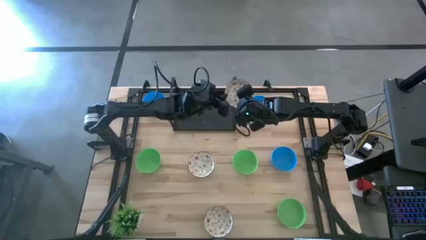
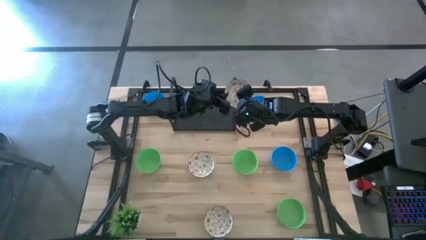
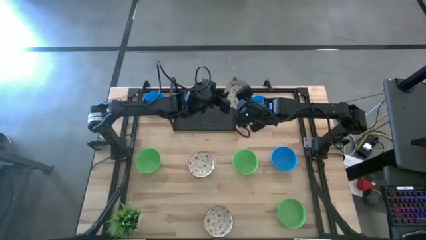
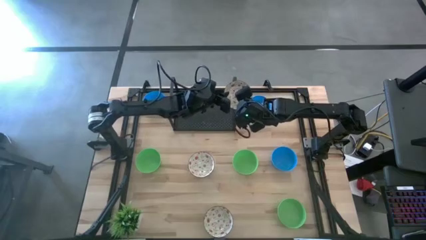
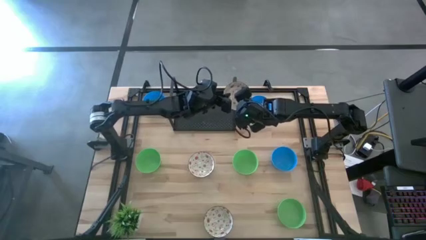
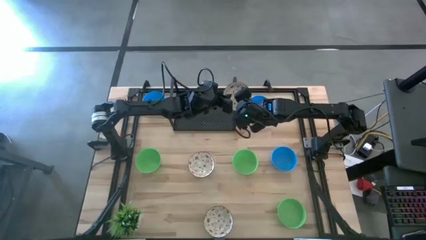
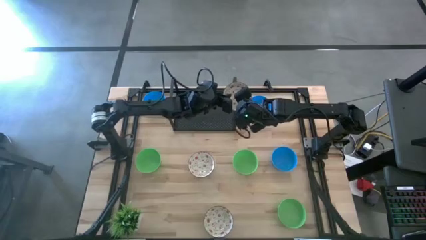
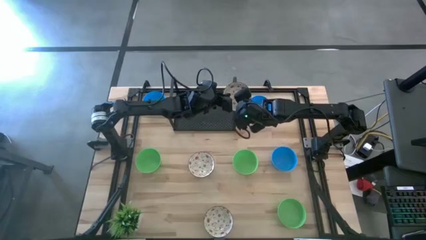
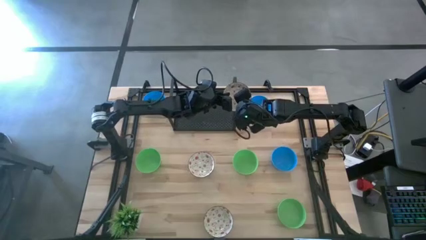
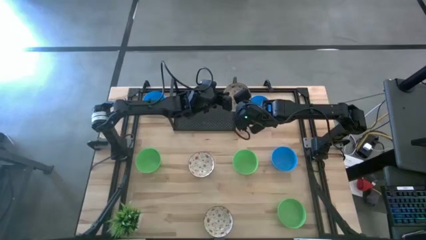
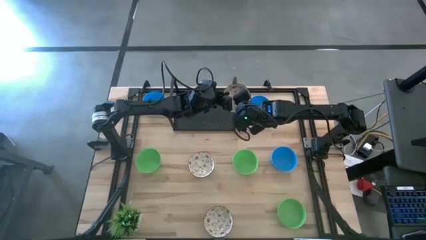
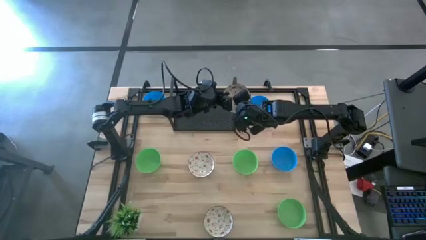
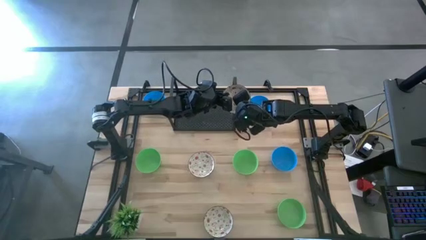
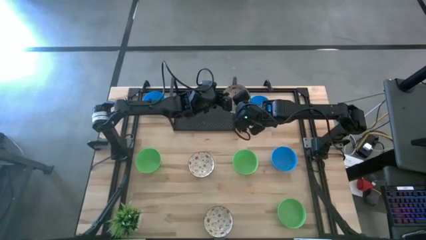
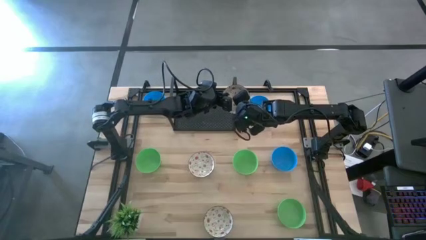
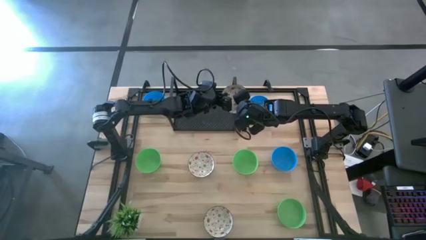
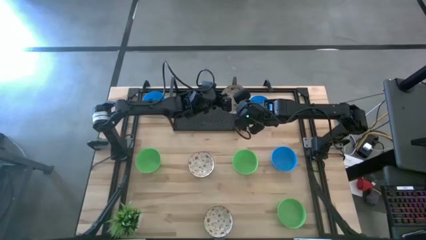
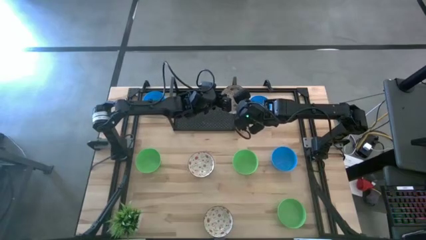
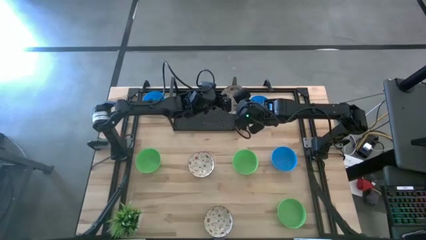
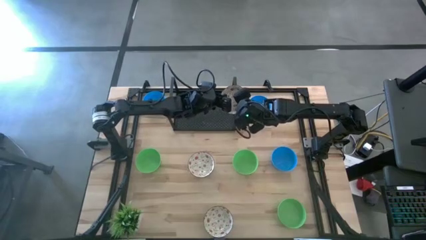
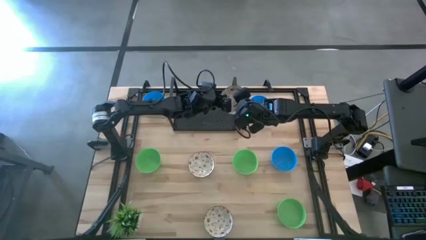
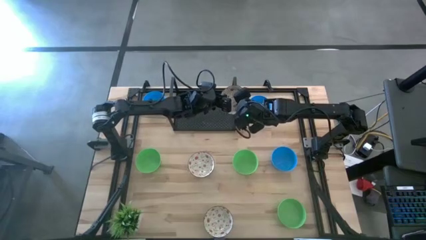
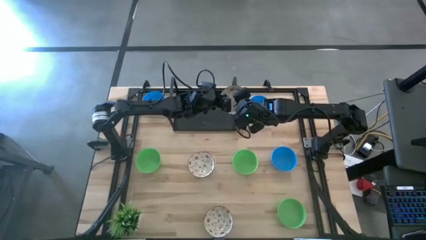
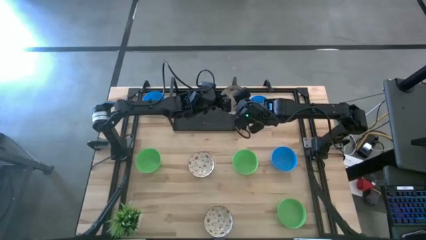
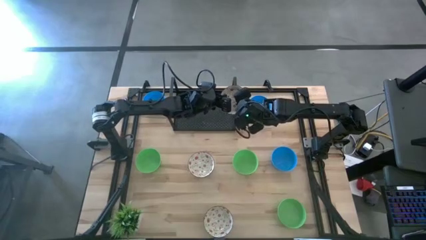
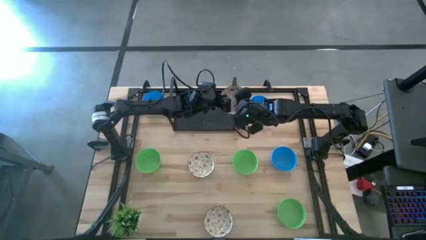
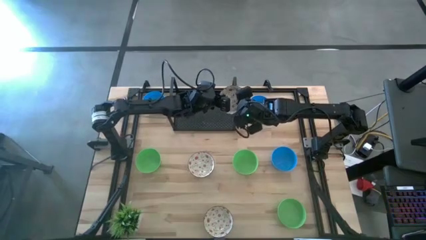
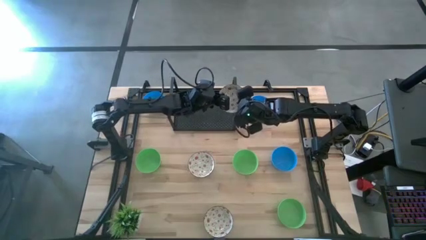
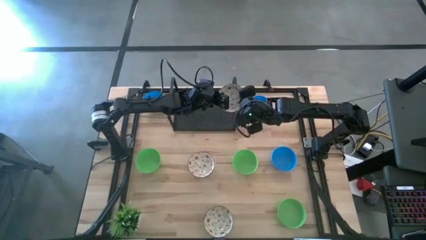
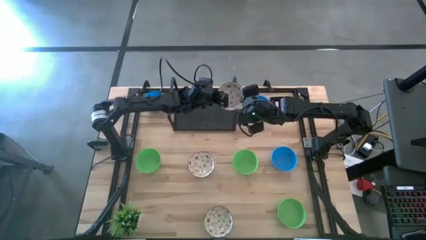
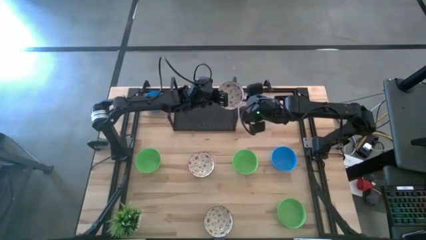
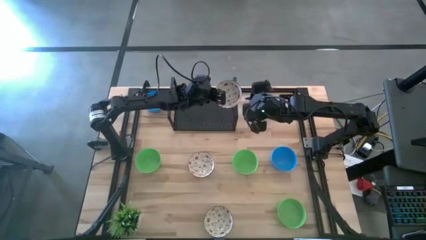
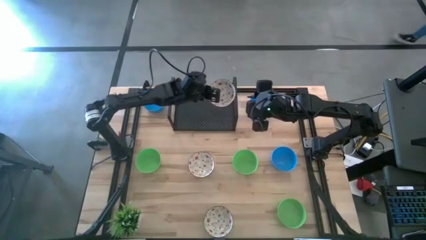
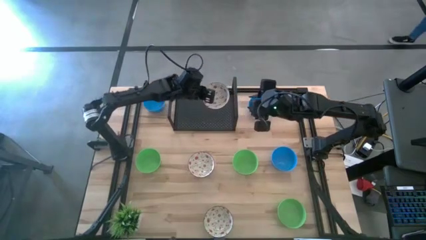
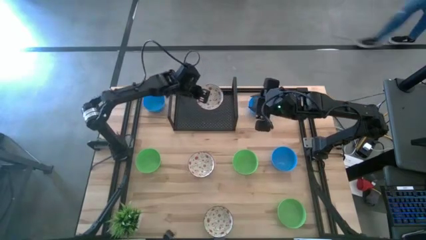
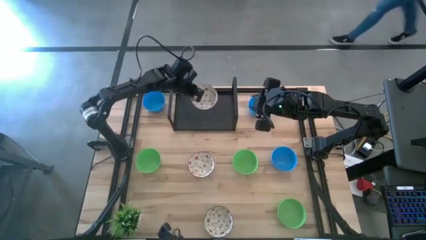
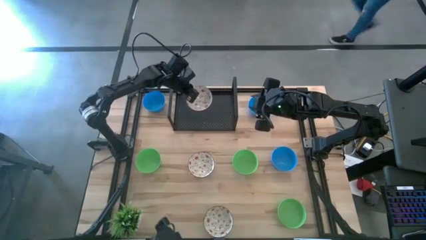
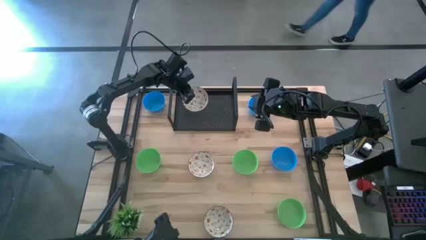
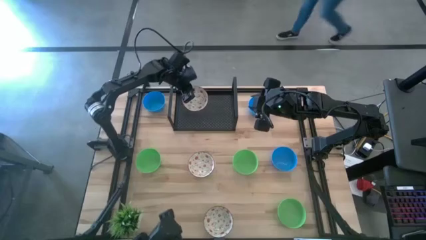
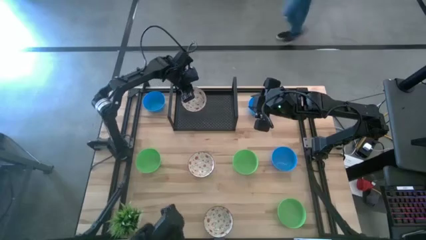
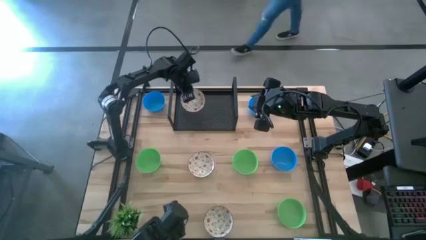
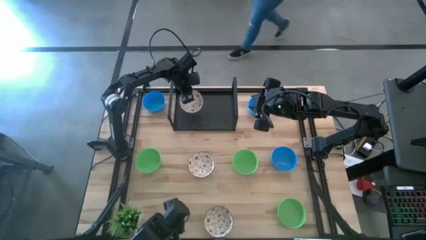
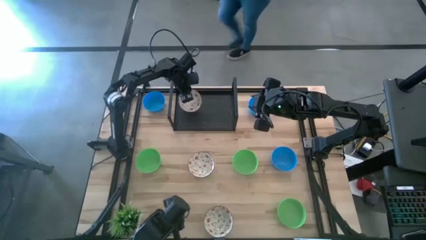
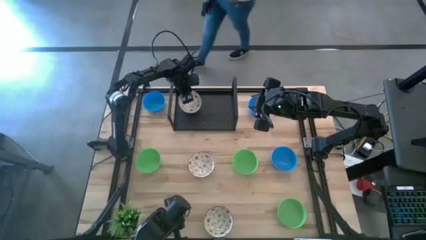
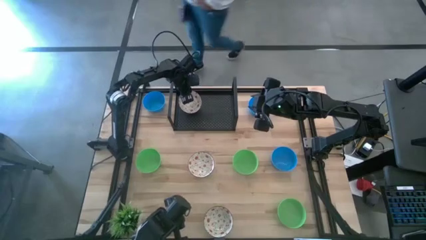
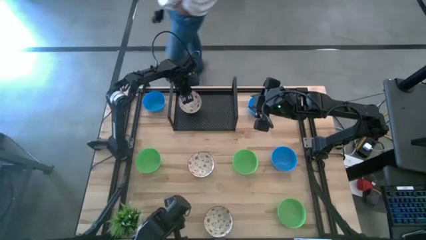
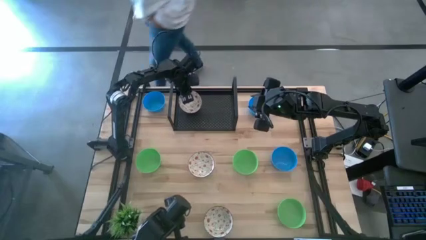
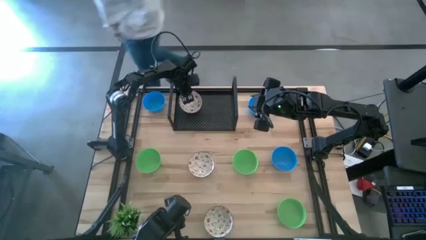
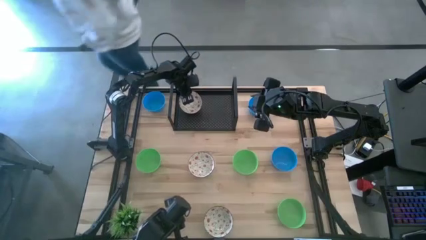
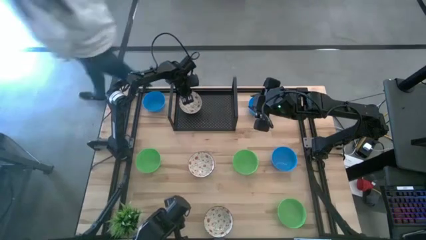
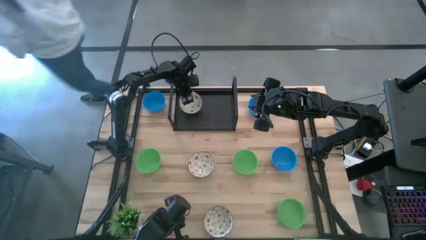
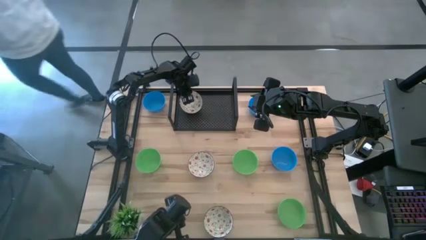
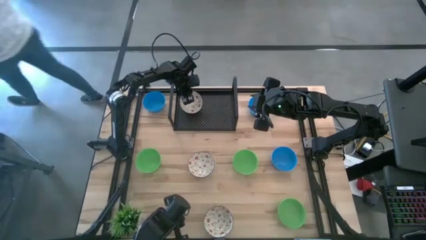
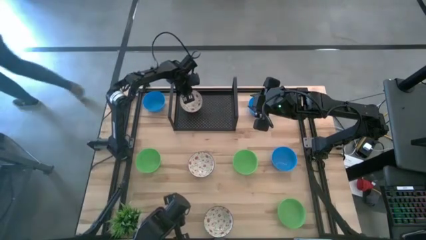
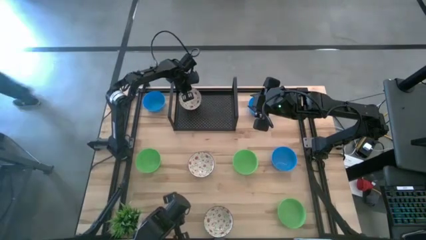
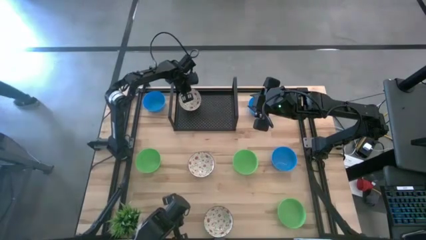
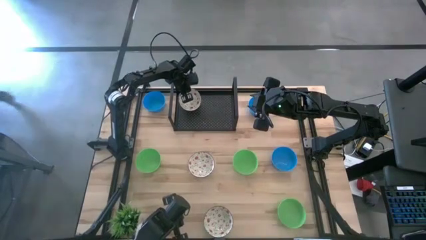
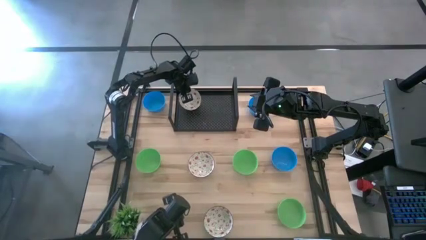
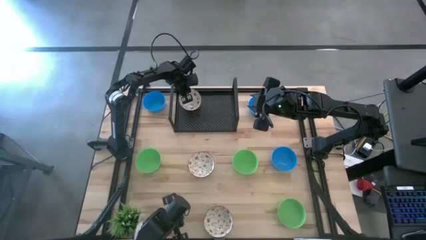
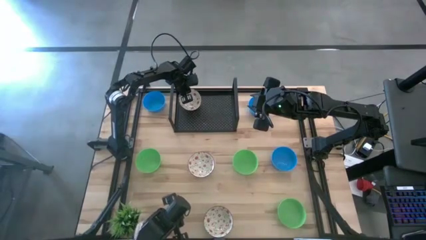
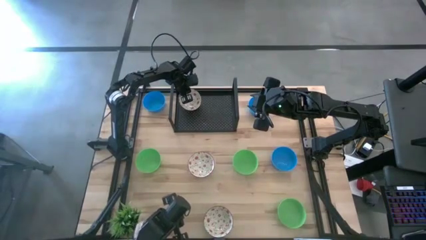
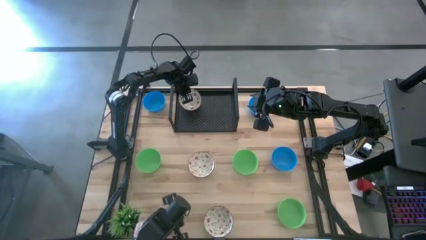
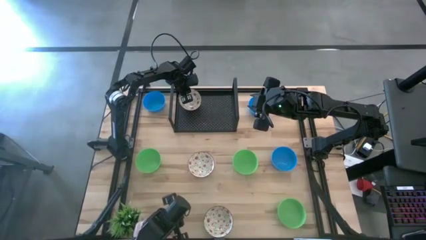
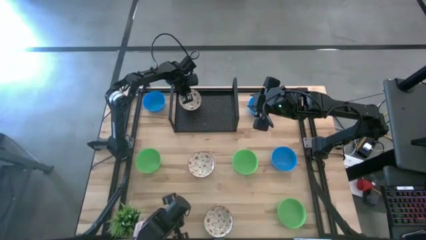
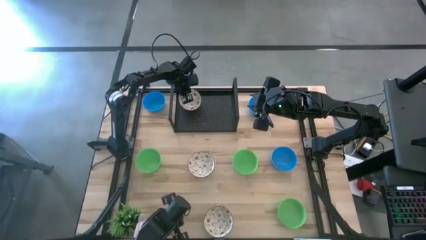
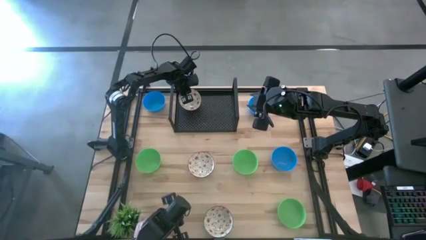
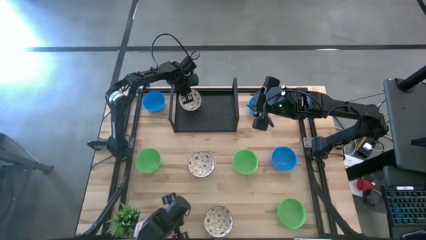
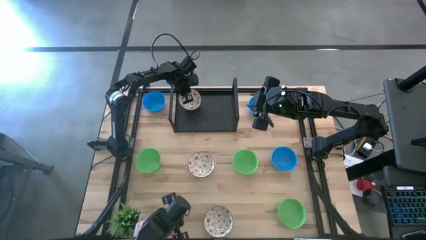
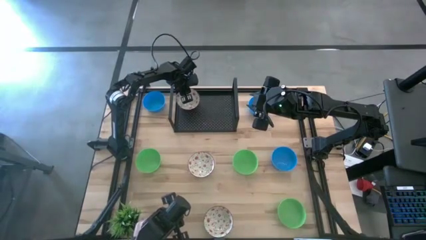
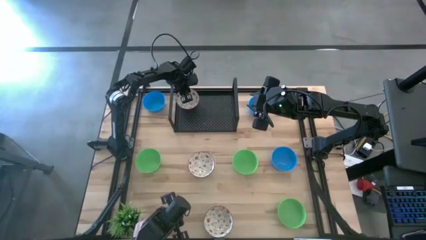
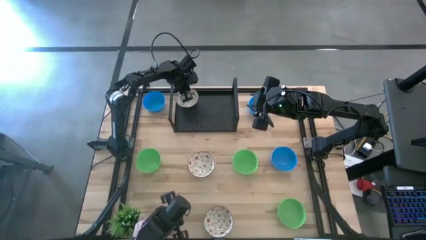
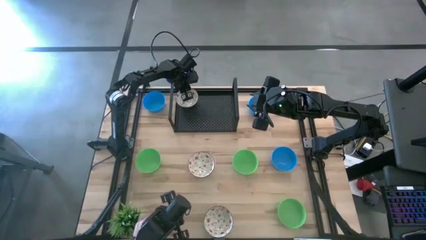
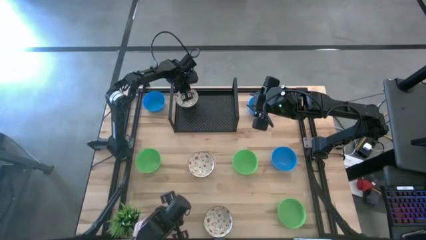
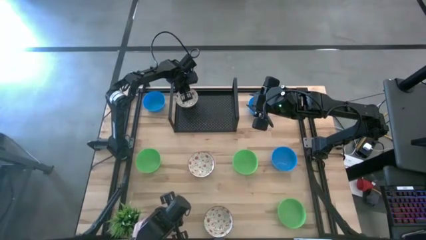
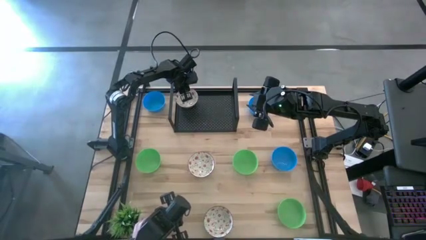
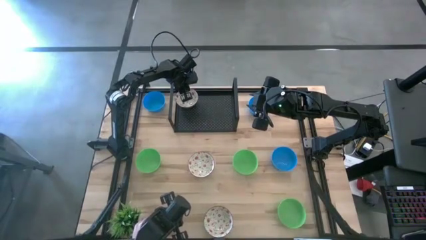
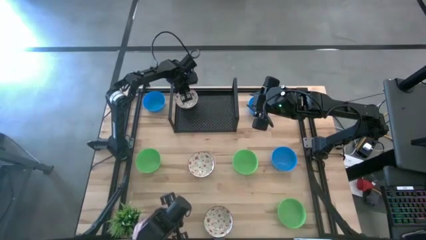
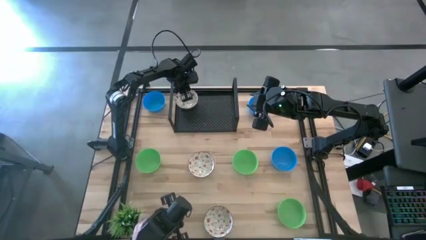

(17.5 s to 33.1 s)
Task: Pick & Place Mini bowls
Put the top white bowl on the shelf
